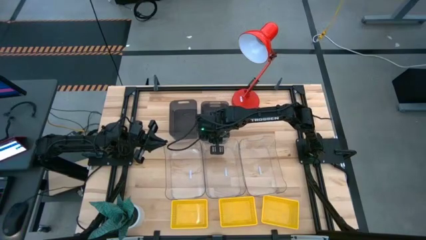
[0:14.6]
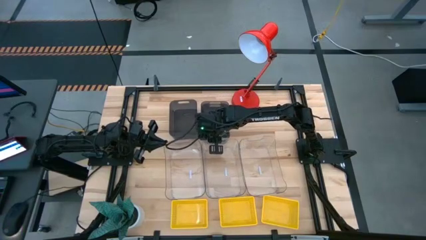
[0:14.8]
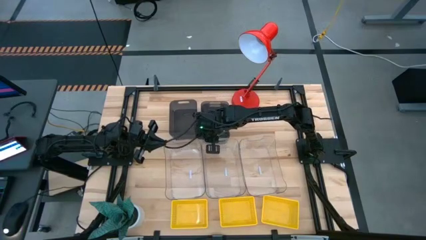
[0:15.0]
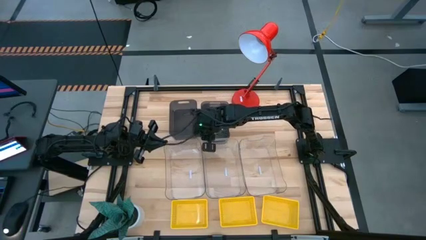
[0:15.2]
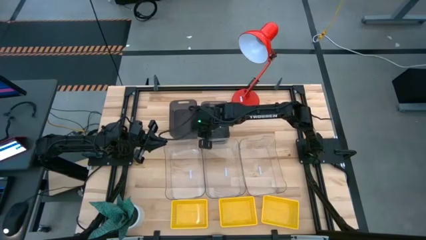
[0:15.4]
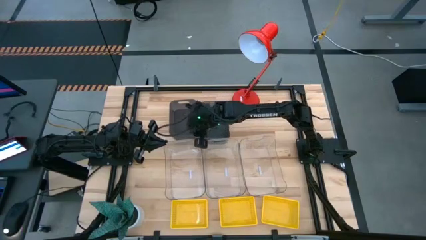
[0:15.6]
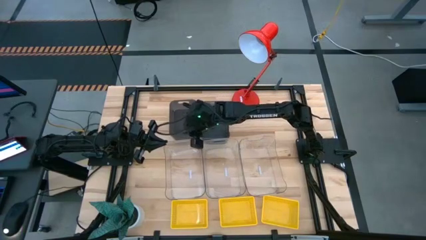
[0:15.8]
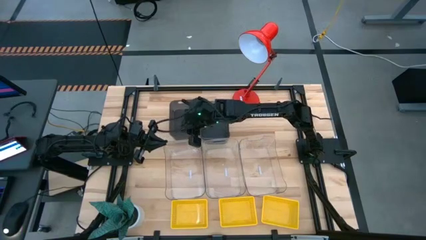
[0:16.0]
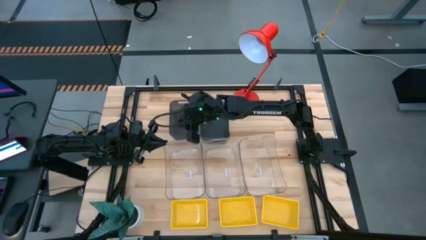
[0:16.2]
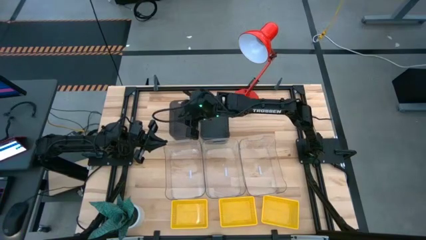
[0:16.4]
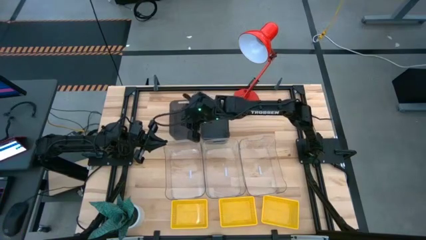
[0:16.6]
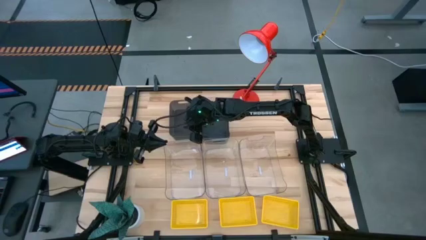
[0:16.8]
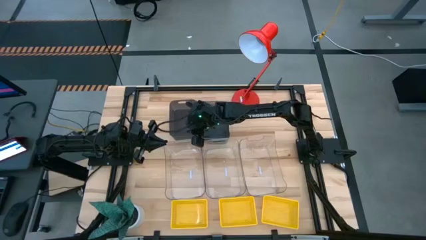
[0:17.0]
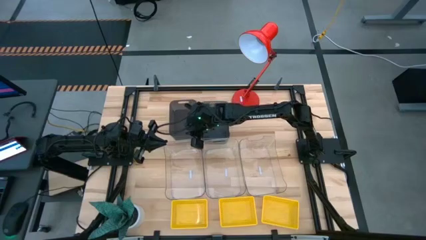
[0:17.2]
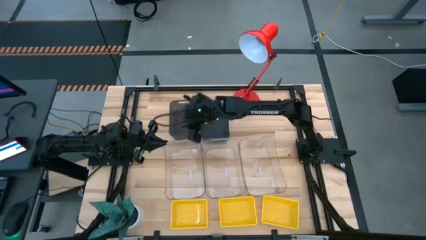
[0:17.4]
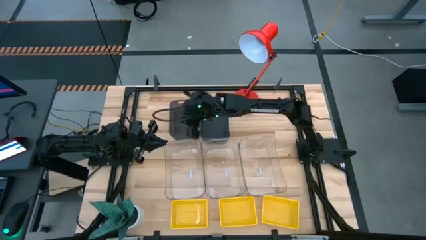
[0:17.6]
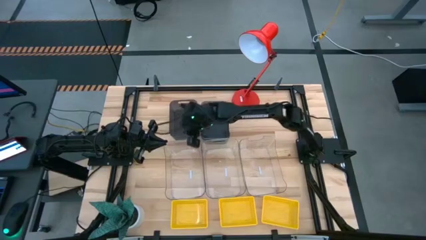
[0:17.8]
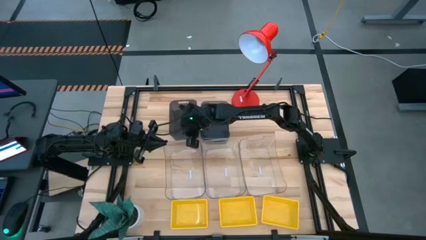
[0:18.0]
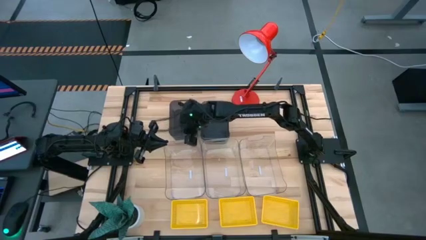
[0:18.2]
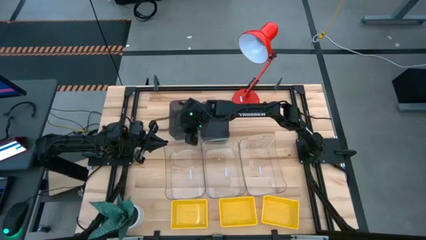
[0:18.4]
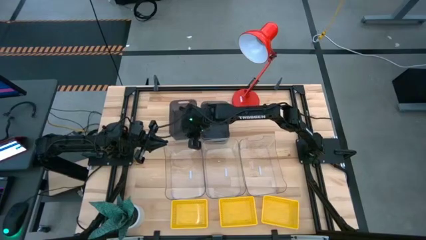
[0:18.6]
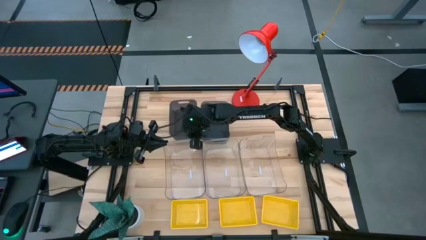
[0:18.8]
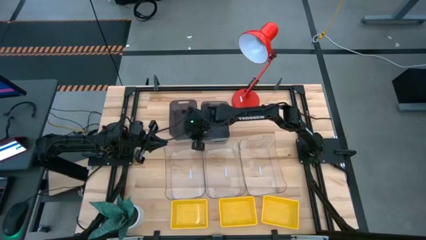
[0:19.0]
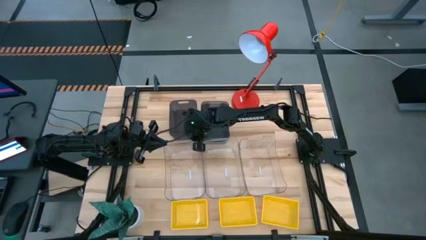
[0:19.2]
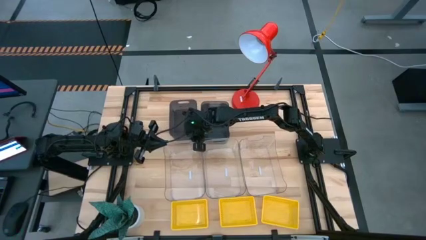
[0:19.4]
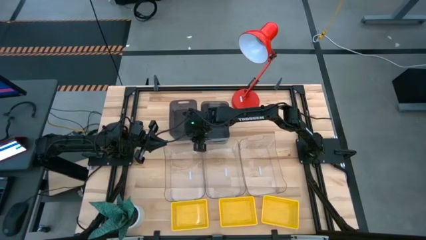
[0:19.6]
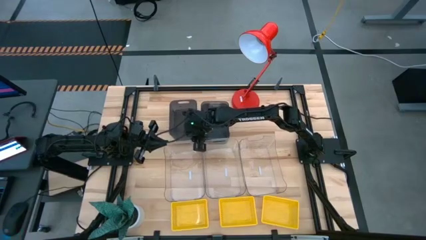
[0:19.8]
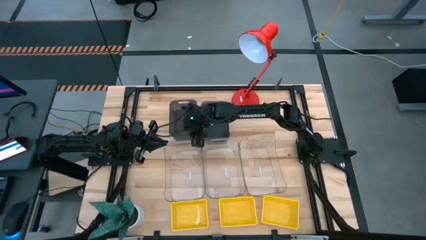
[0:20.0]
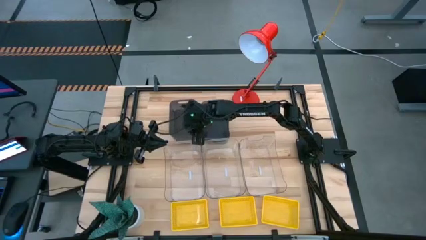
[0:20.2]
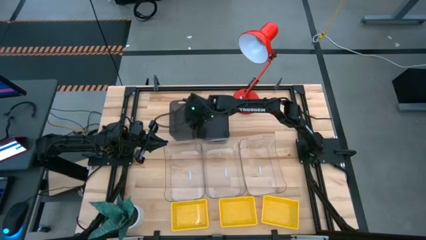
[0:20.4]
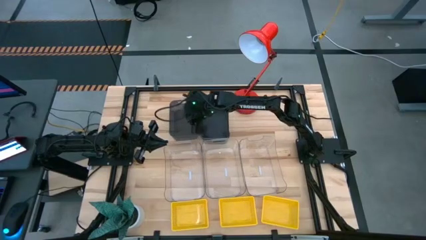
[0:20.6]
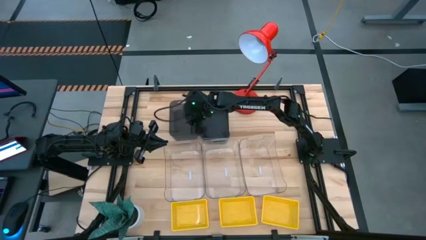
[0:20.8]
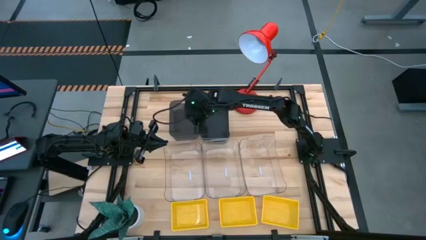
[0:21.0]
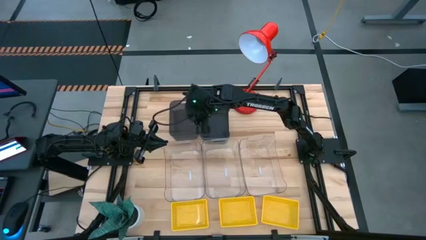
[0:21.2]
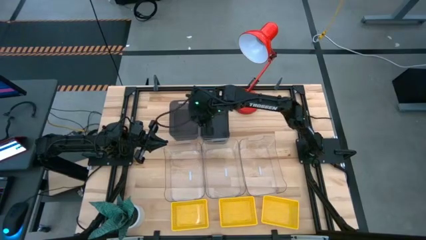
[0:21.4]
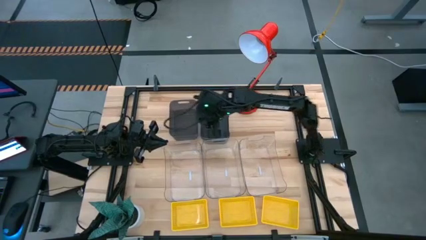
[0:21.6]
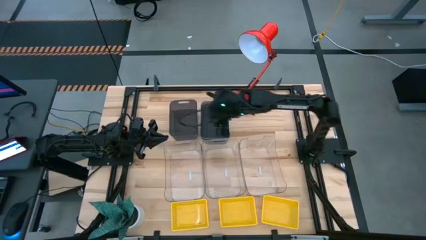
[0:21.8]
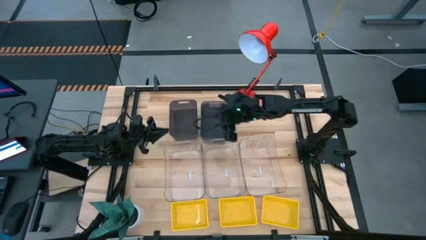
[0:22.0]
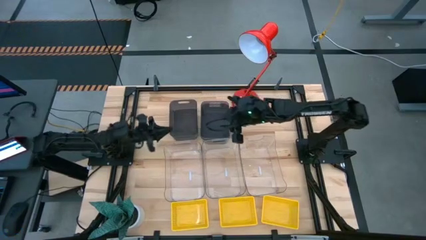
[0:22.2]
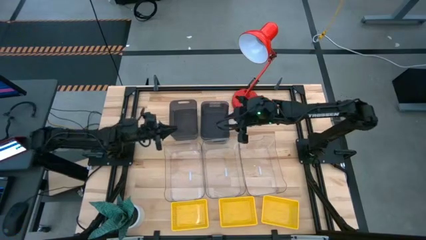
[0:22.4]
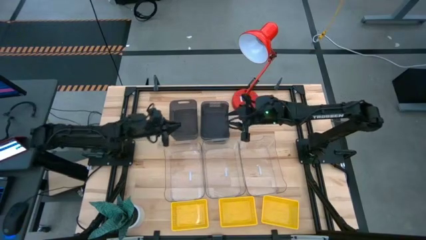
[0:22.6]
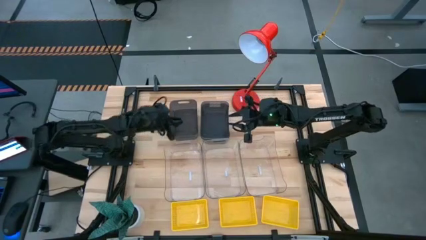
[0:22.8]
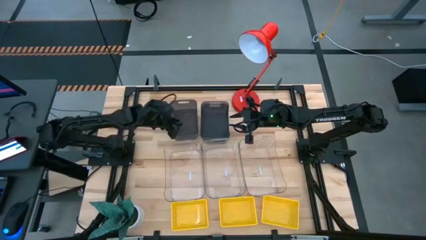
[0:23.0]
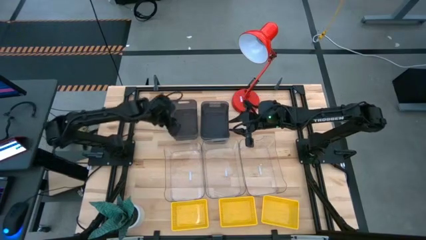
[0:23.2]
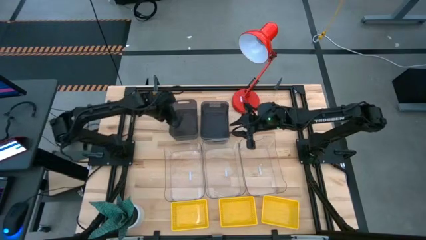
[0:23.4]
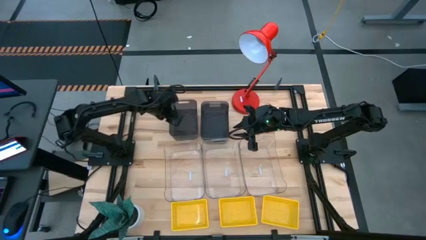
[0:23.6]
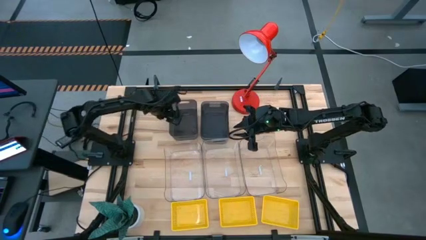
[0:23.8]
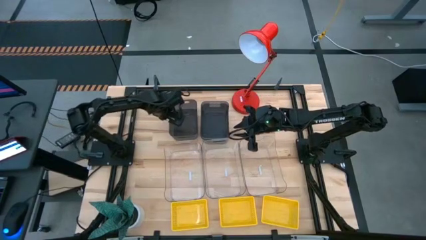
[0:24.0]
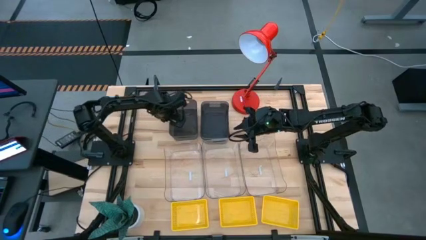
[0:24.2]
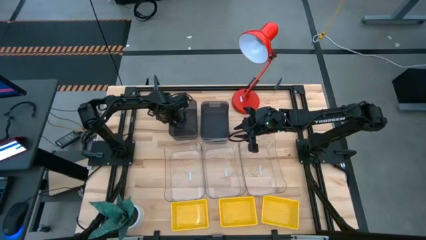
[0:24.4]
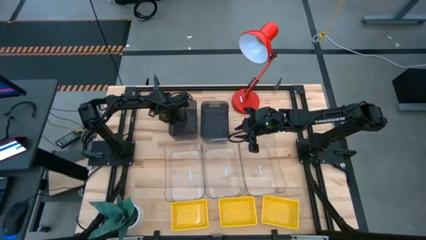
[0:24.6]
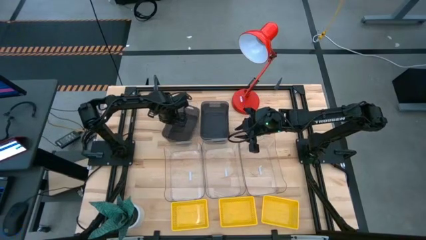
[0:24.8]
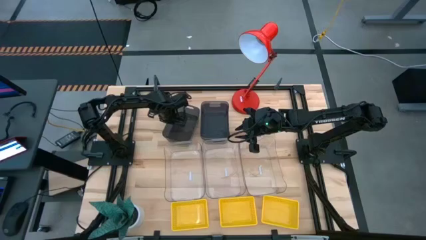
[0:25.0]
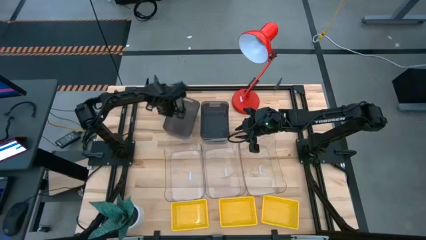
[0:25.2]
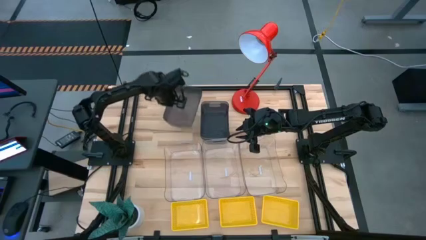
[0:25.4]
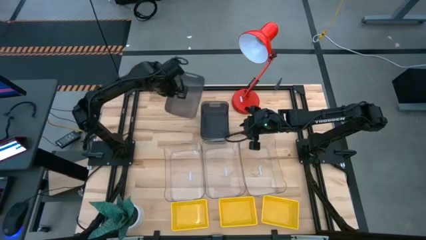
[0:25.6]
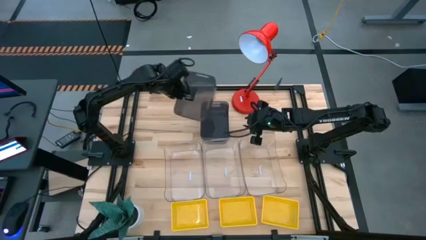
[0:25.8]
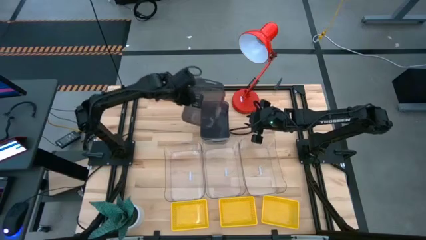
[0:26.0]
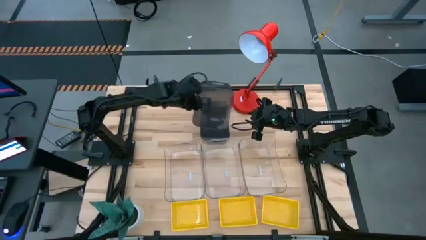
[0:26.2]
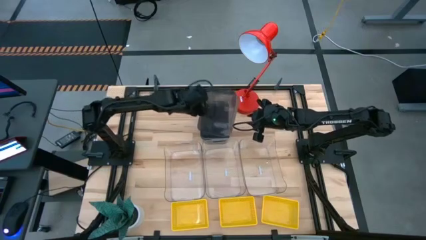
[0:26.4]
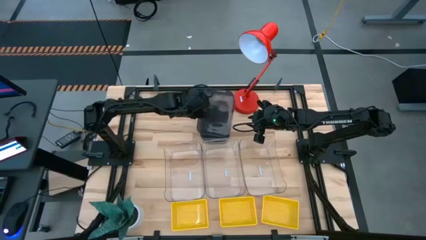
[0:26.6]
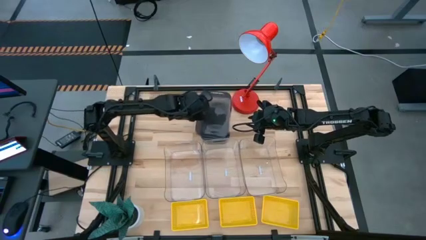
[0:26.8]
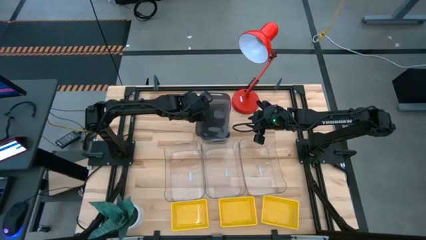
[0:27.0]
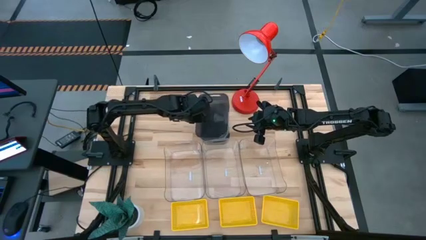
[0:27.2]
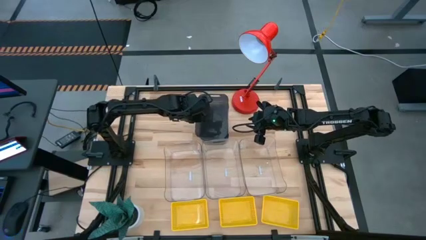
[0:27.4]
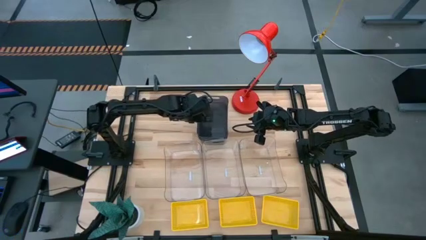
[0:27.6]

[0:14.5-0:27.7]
Stack the left black bin on top of the the middle black bins
